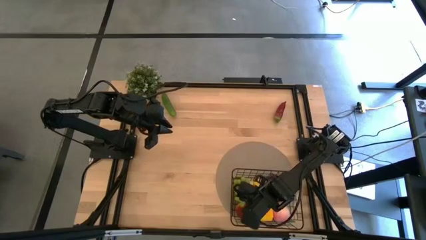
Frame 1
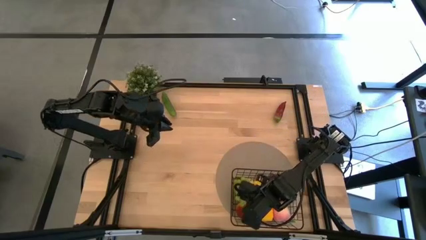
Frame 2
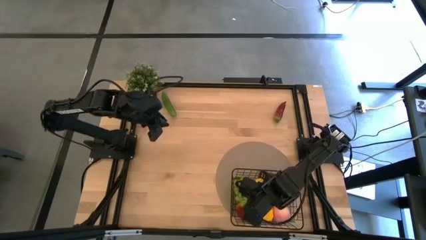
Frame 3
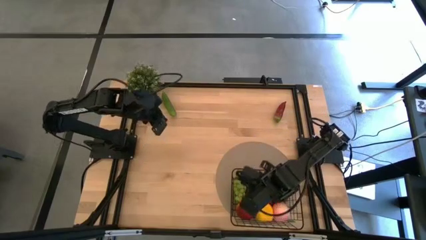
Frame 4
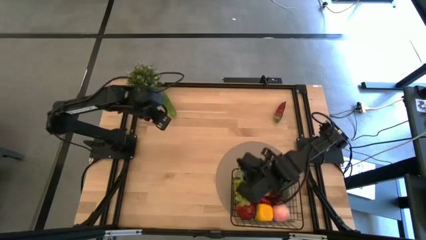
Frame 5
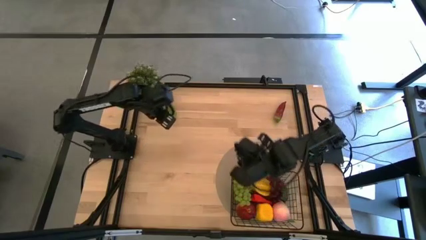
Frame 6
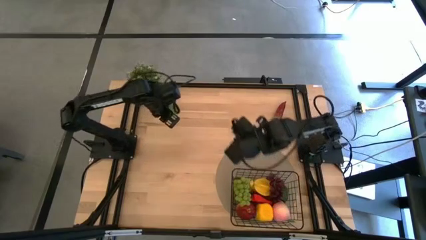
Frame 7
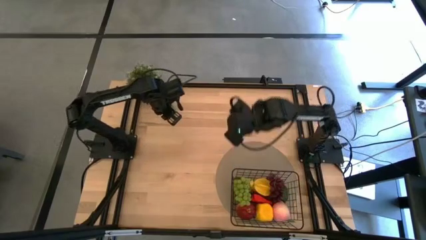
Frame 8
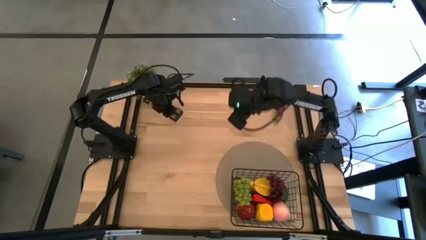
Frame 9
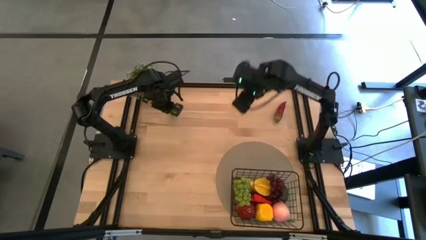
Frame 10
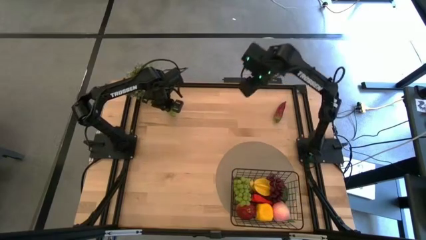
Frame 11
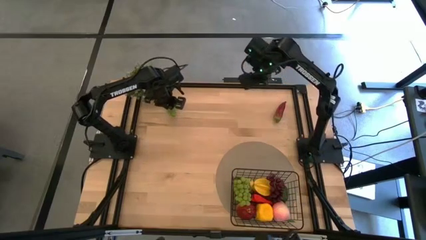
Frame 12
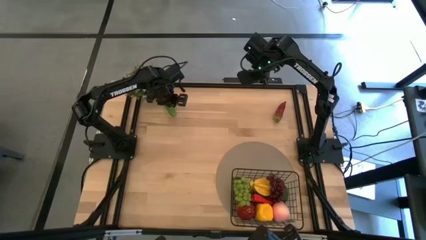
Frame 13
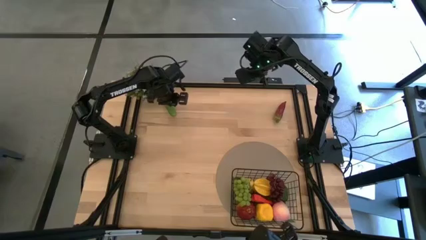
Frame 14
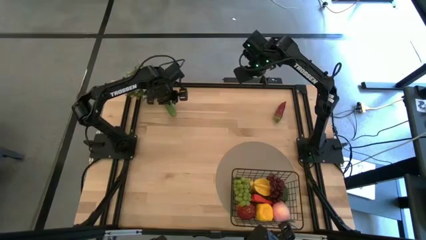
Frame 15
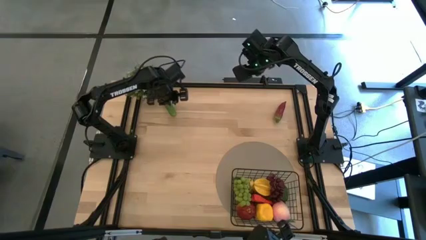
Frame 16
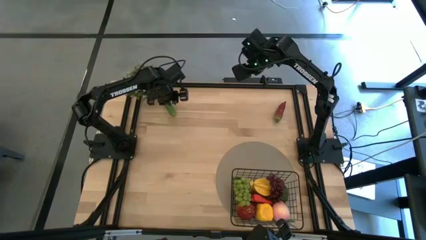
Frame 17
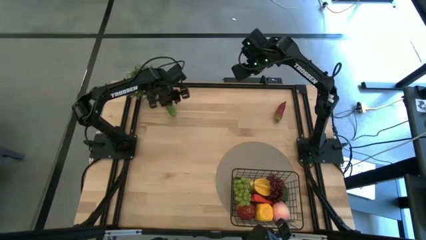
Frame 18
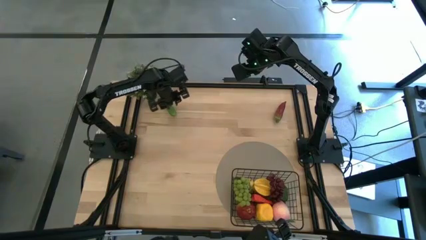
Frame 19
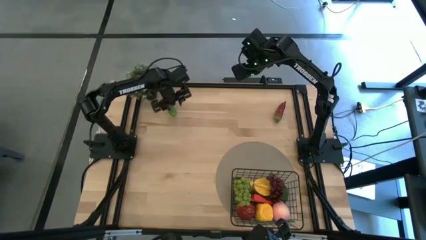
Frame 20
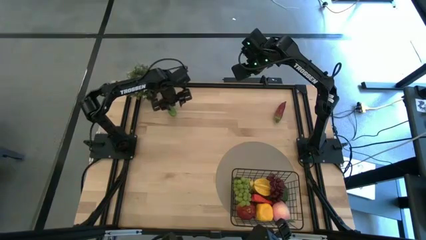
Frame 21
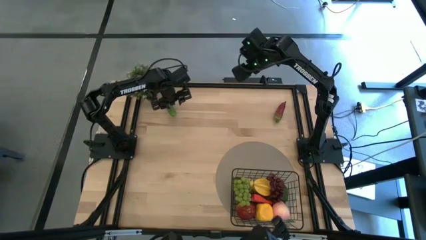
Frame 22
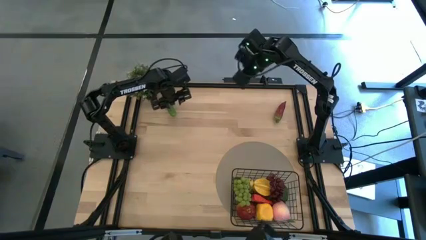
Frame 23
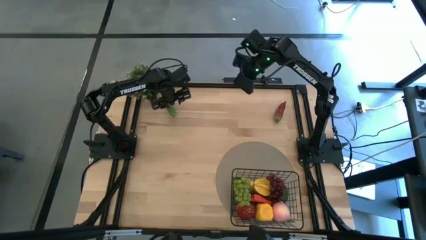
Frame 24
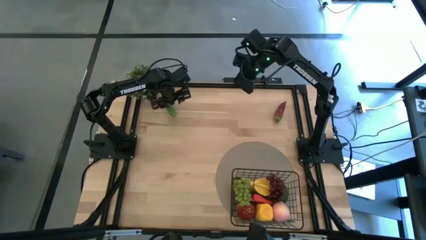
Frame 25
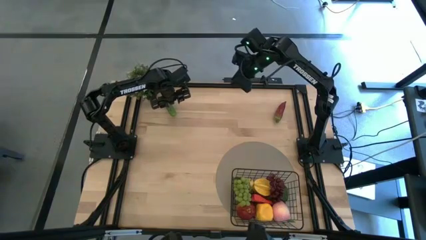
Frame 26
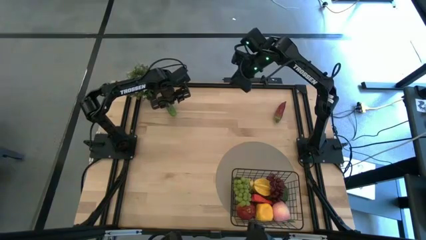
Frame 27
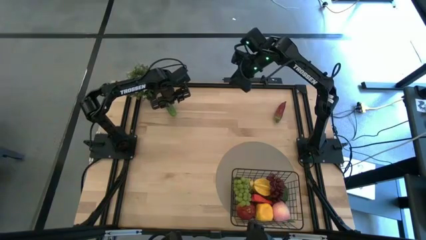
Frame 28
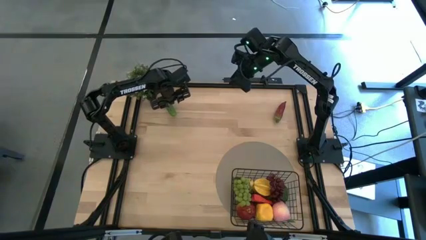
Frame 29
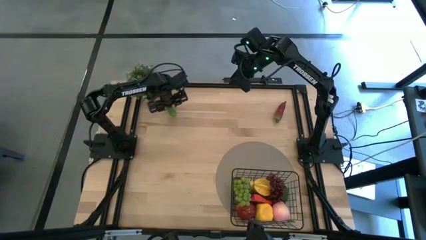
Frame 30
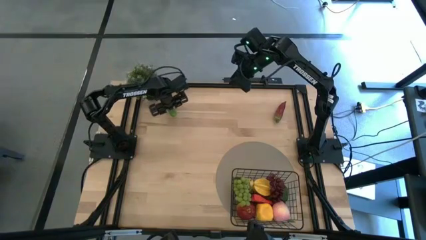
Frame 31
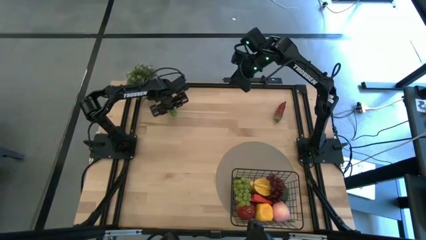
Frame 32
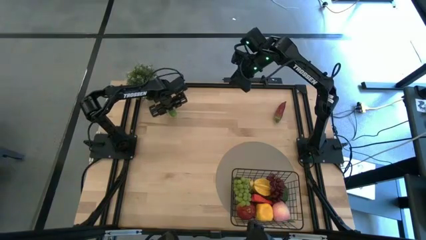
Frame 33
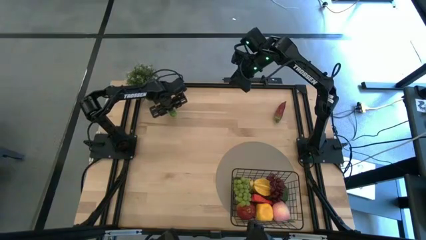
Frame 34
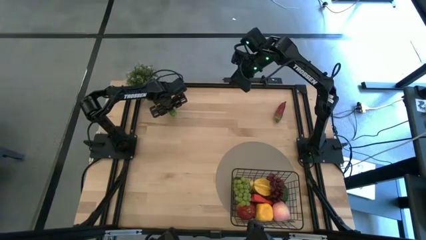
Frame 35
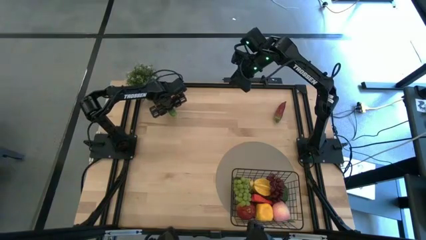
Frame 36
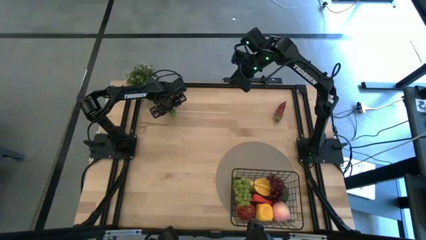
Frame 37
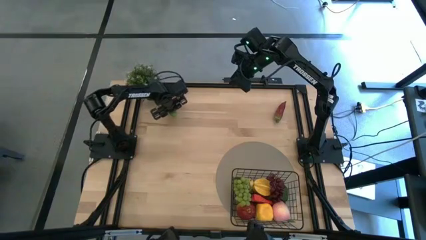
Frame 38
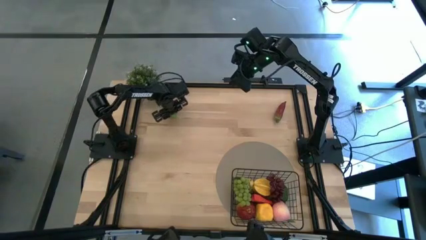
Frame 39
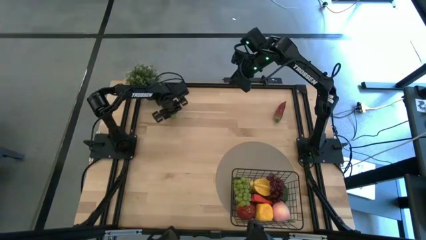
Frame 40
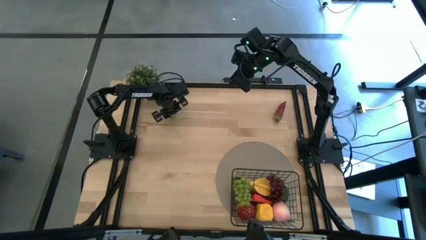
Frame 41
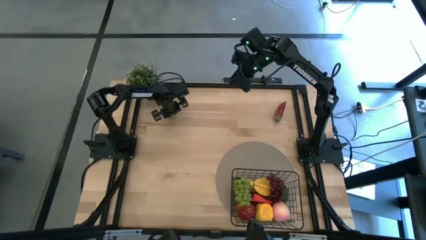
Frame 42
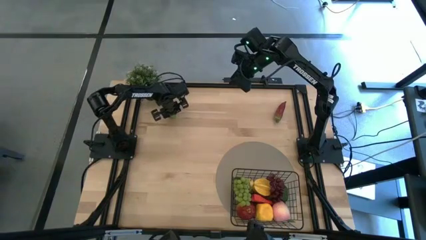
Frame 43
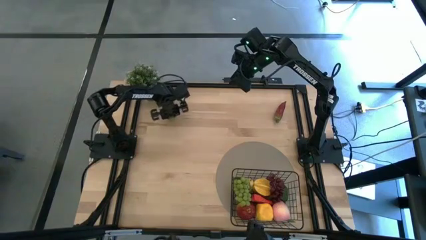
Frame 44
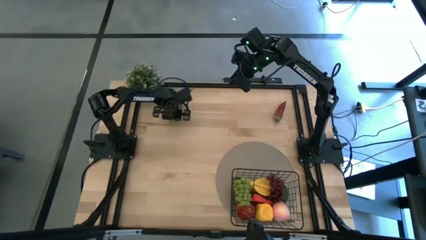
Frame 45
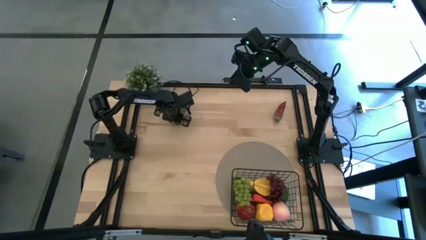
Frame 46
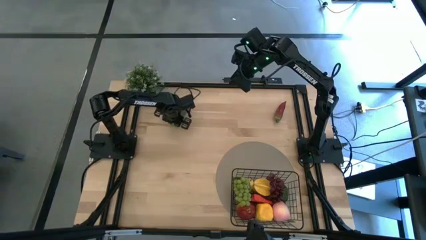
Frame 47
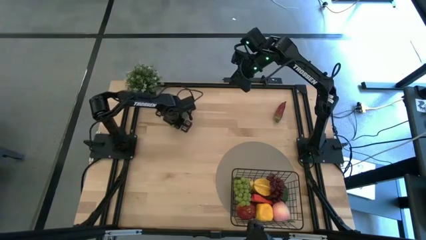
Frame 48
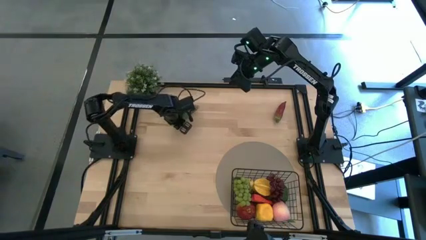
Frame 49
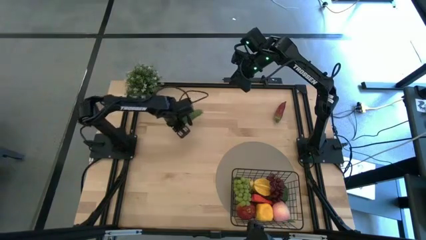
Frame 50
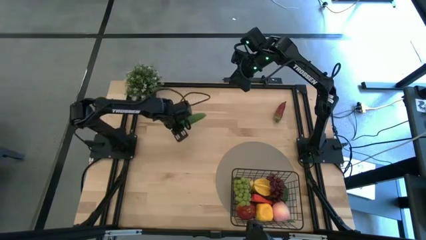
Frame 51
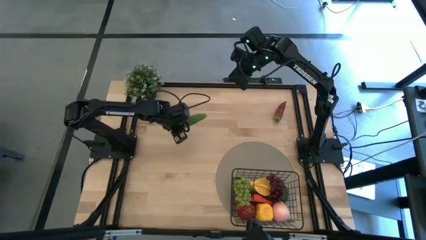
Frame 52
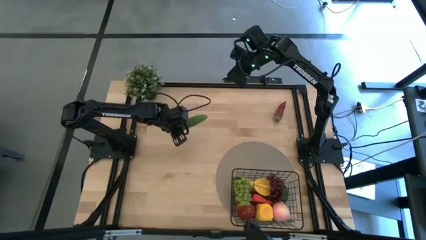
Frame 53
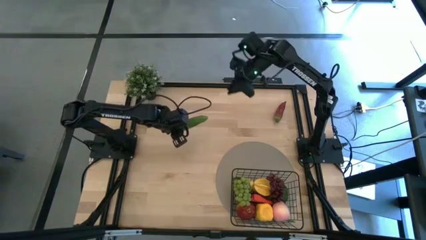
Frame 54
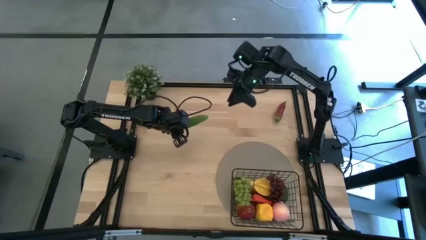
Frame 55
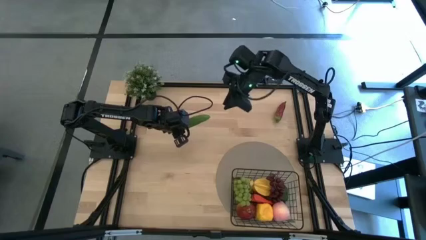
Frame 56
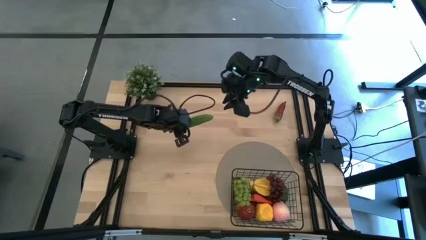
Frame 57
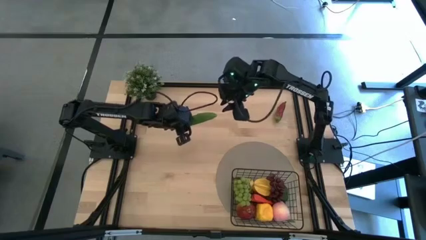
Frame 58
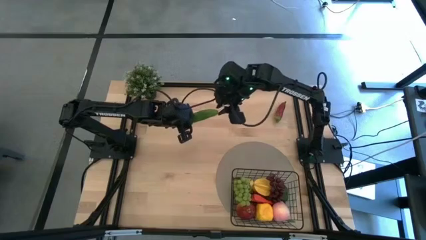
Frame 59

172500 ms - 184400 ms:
Task: Build produce basket
Put the green cucumber into the wire basket

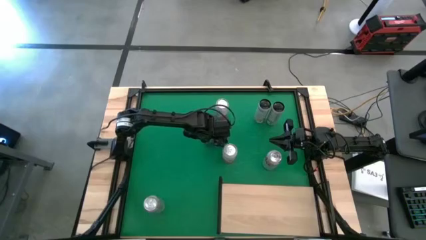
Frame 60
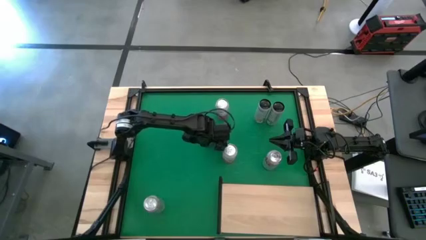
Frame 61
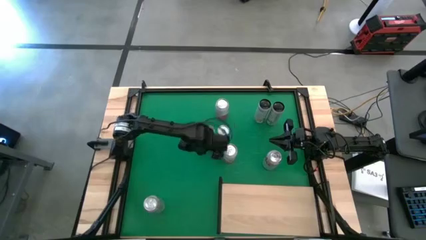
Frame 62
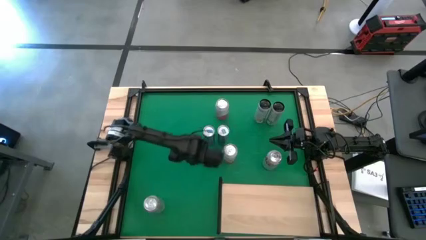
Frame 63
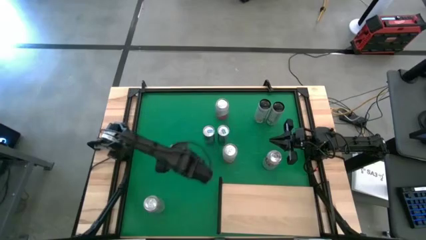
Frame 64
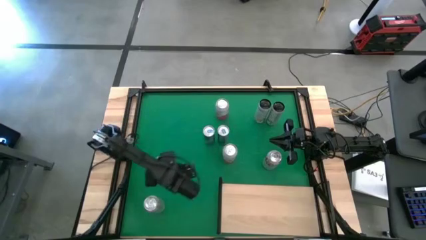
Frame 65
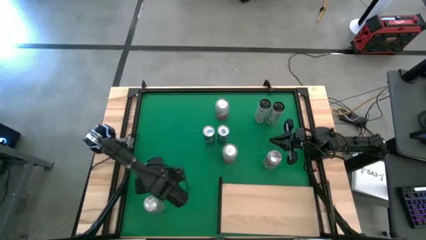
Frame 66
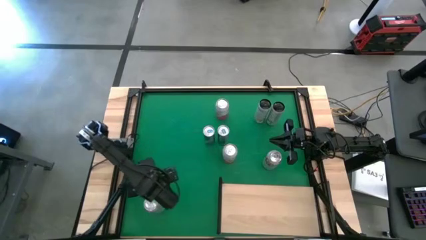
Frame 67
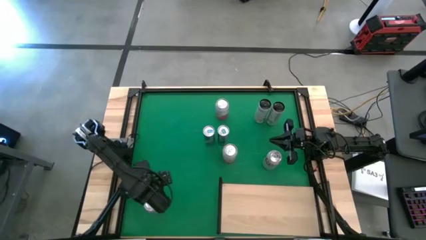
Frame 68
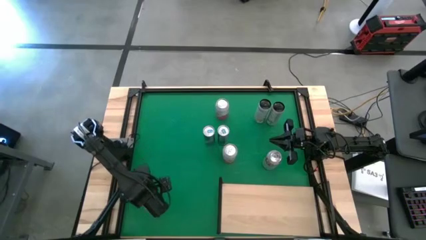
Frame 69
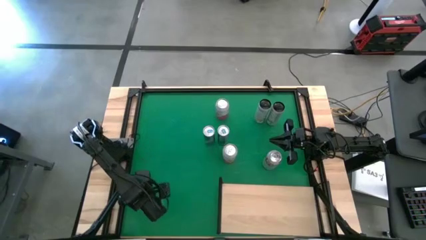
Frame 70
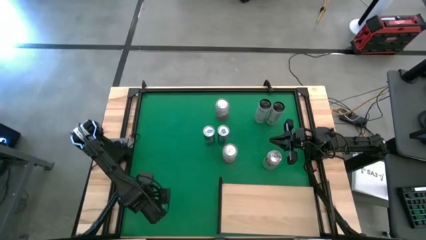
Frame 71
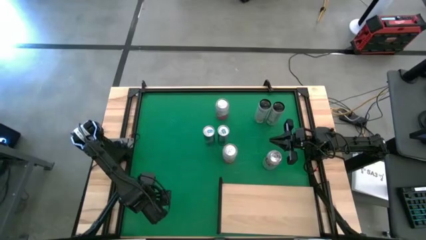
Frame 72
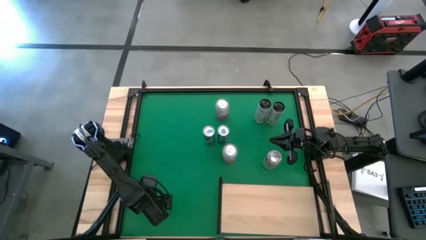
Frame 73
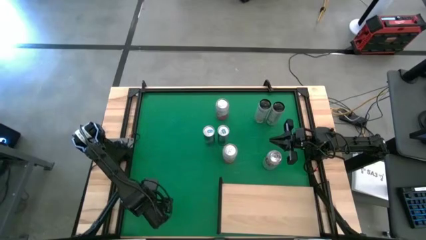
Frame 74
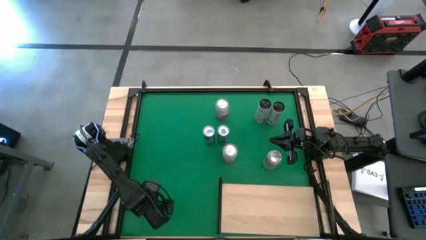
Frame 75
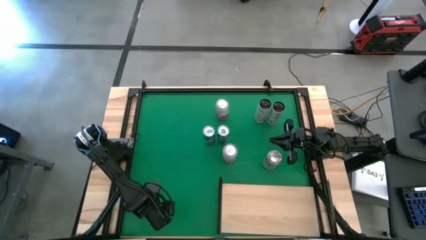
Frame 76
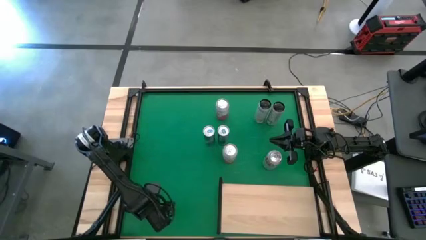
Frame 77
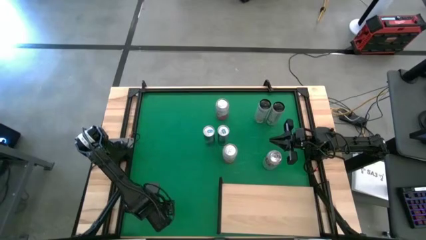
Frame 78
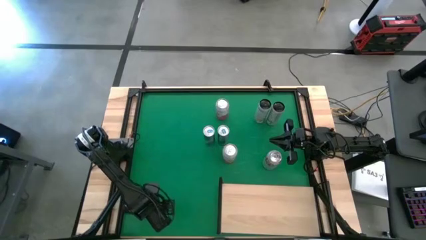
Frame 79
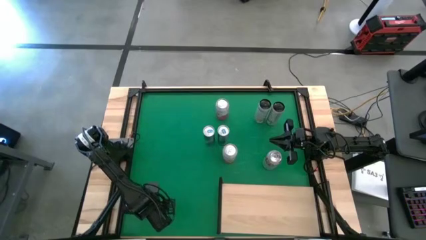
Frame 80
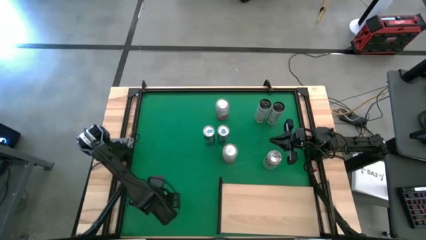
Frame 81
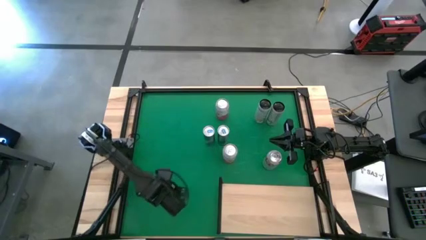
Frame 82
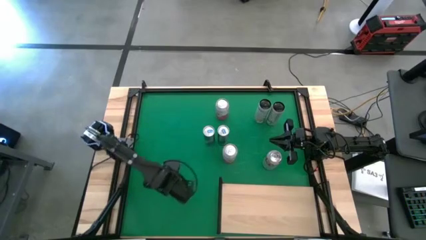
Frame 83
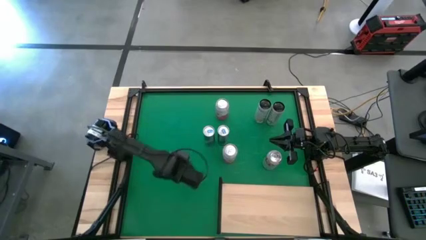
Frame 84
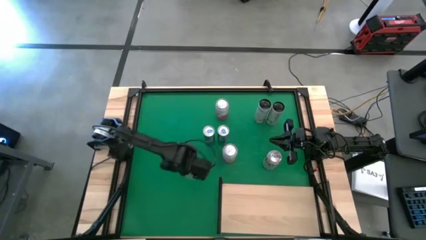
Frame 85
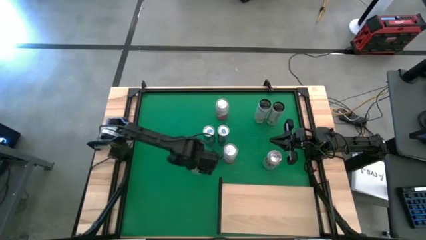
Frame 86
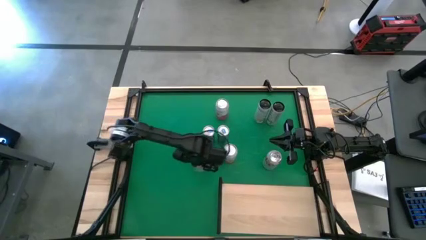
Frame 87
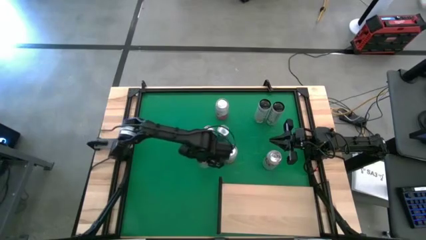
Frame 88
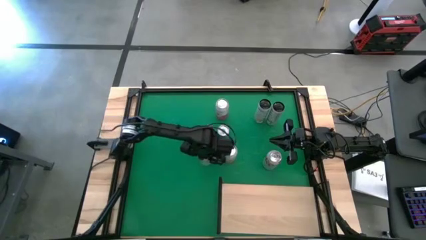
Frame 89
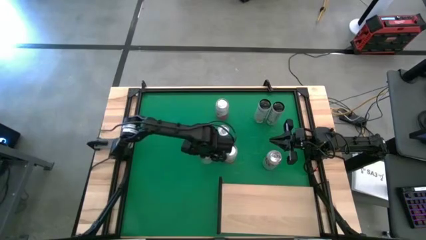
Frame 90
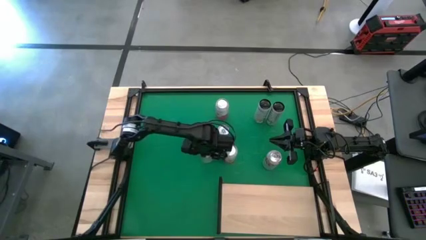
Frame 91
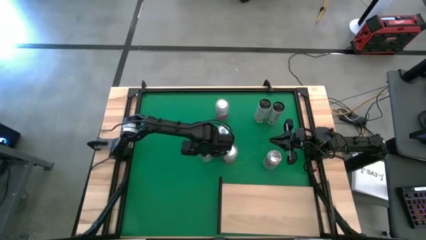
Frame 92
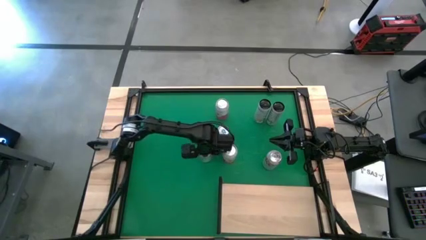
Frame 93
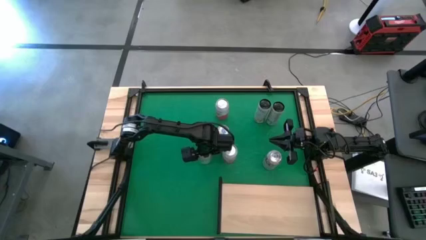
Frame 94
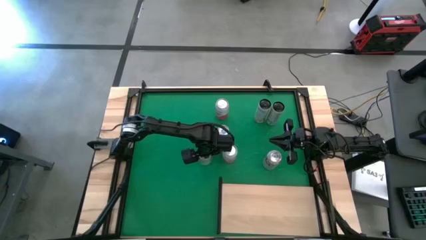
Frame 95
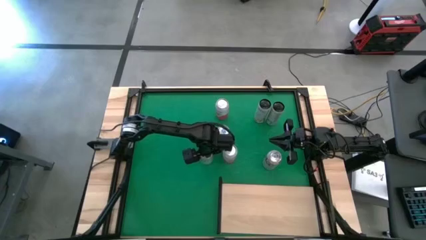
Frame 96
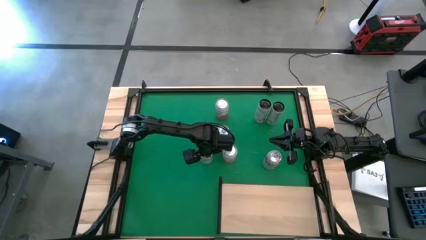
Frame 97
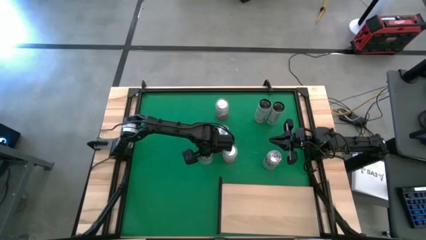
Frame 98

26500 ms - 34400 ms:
Task: Place canned beverage on shelf
Move the left red-silver soda can to the center of the table
